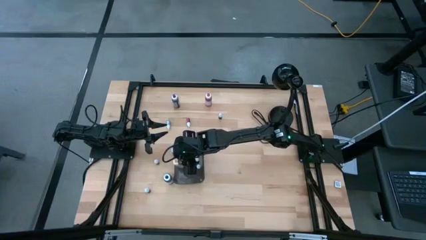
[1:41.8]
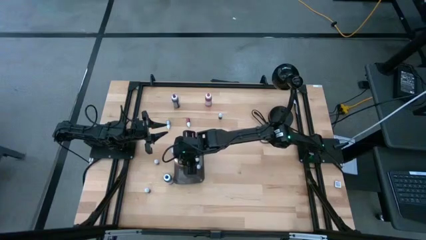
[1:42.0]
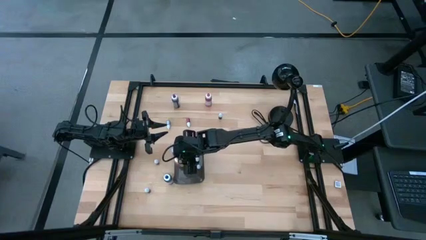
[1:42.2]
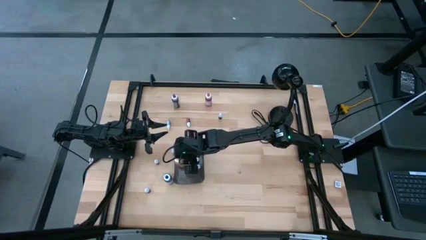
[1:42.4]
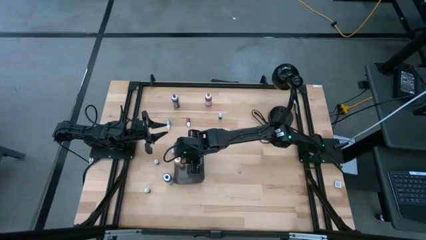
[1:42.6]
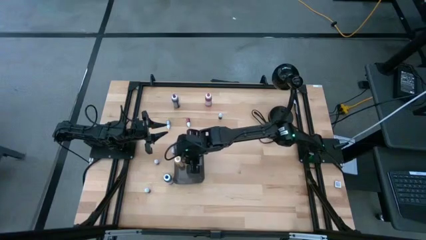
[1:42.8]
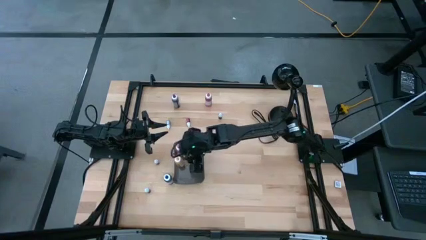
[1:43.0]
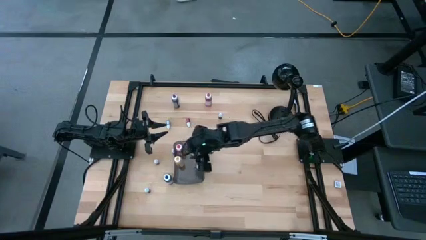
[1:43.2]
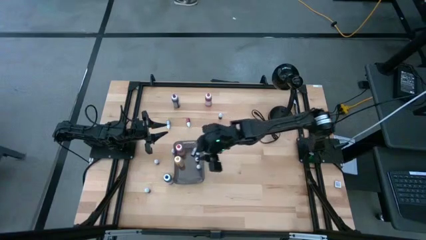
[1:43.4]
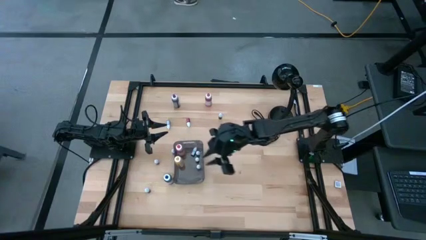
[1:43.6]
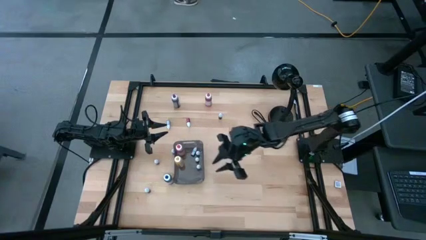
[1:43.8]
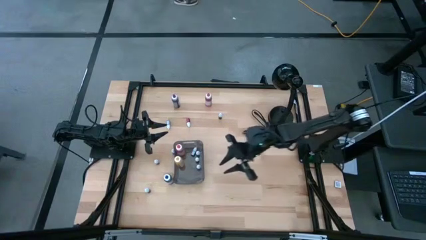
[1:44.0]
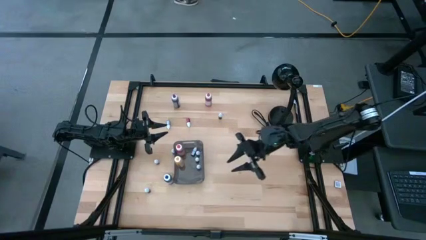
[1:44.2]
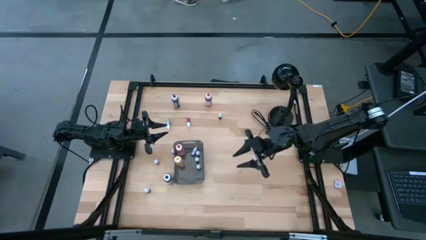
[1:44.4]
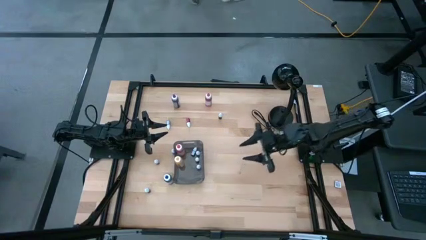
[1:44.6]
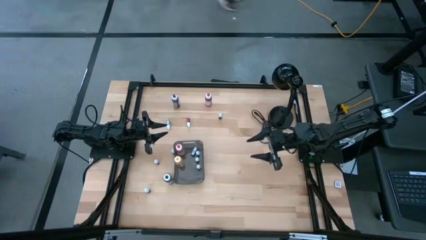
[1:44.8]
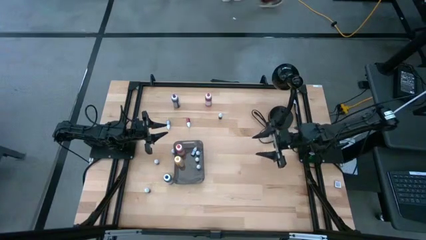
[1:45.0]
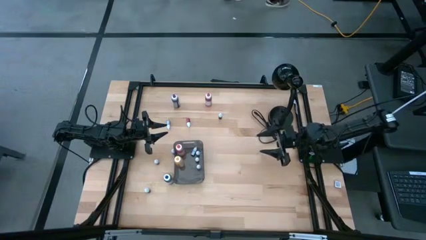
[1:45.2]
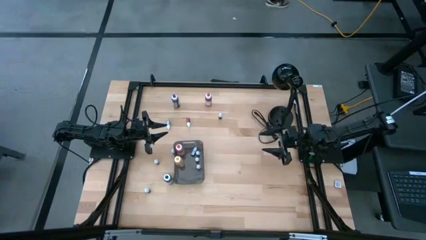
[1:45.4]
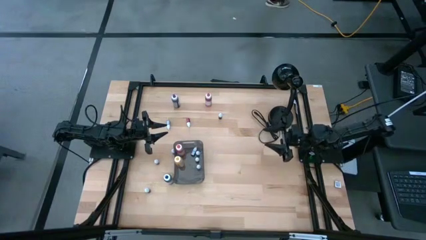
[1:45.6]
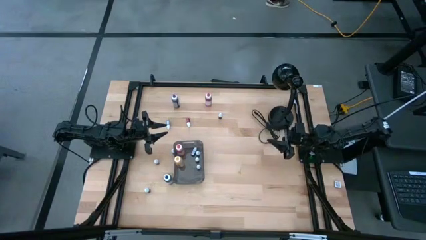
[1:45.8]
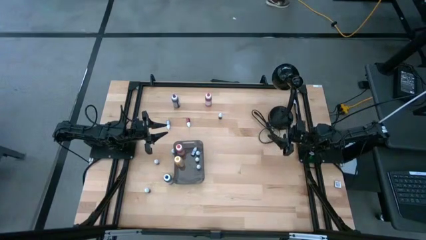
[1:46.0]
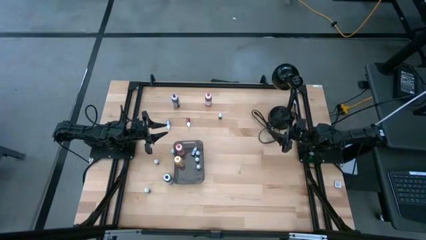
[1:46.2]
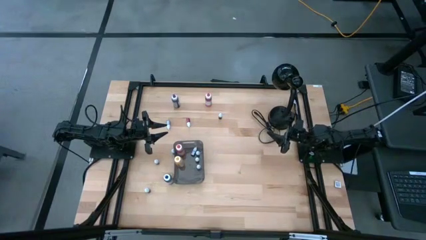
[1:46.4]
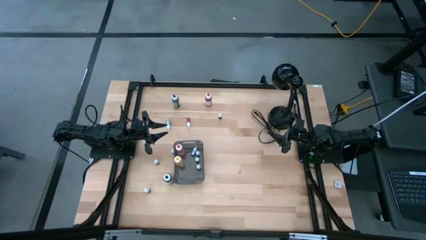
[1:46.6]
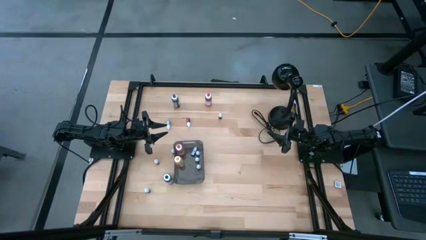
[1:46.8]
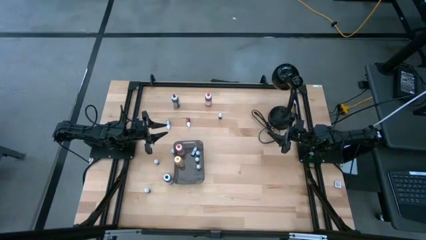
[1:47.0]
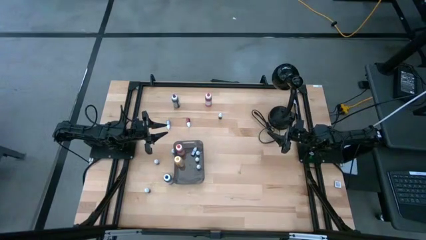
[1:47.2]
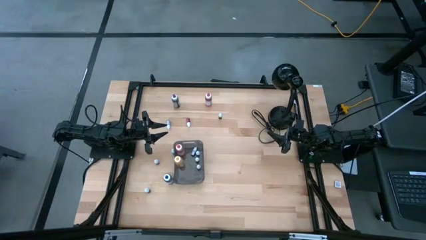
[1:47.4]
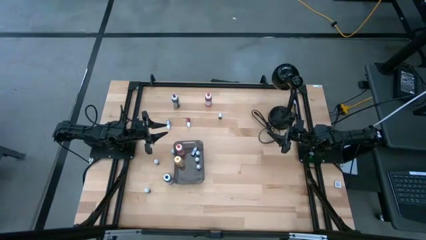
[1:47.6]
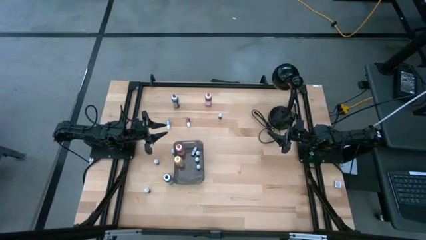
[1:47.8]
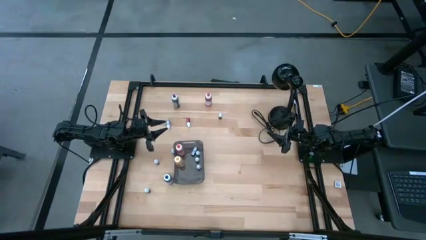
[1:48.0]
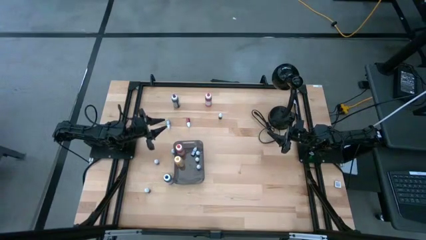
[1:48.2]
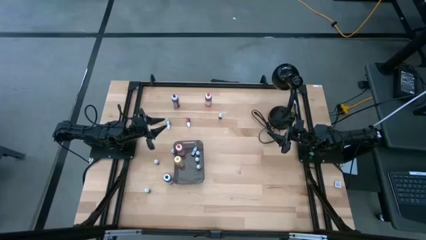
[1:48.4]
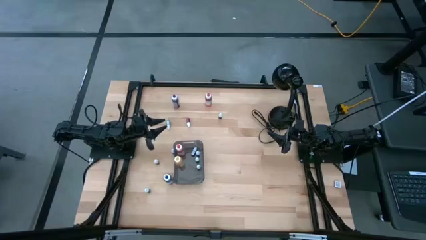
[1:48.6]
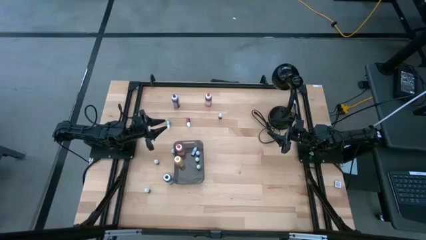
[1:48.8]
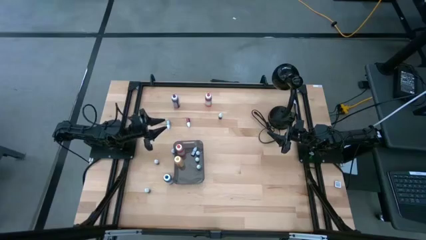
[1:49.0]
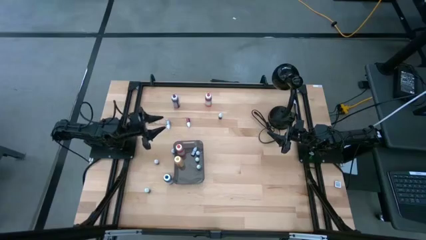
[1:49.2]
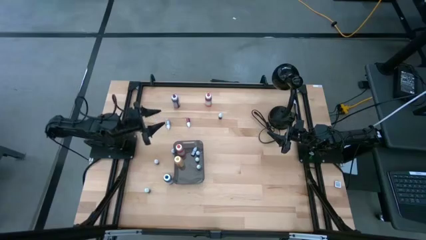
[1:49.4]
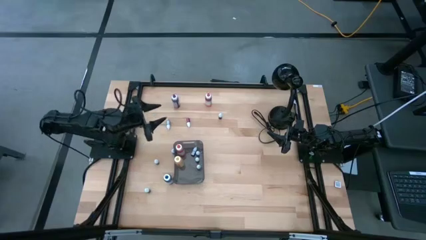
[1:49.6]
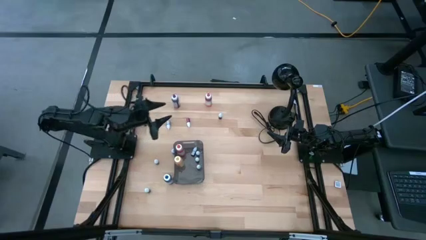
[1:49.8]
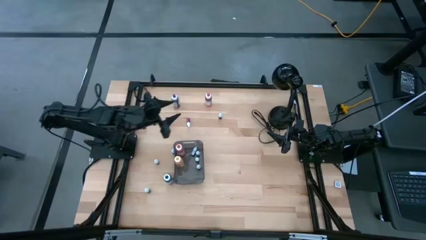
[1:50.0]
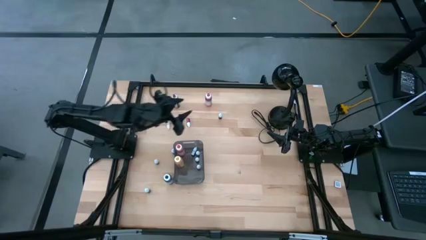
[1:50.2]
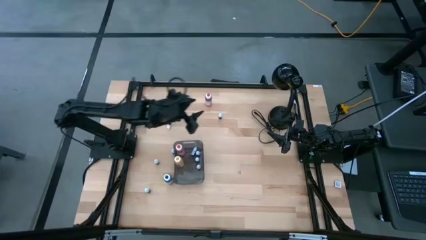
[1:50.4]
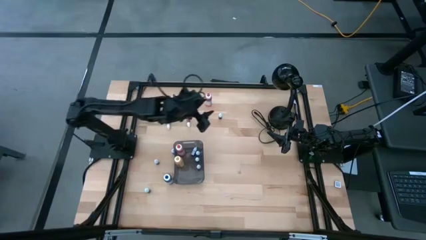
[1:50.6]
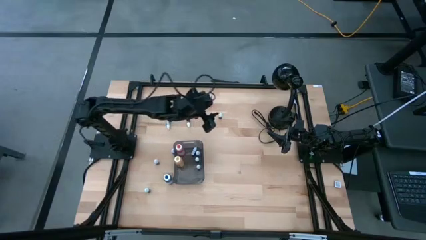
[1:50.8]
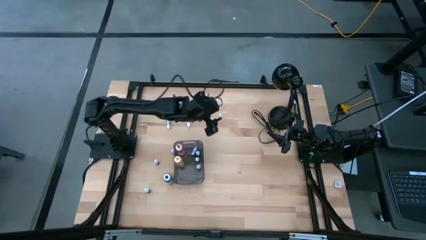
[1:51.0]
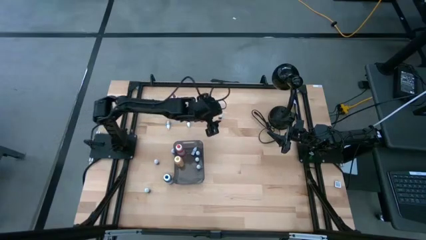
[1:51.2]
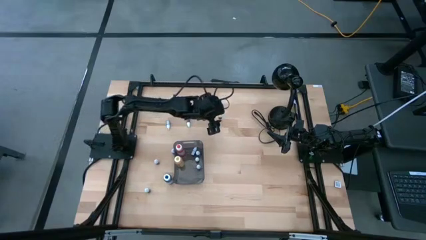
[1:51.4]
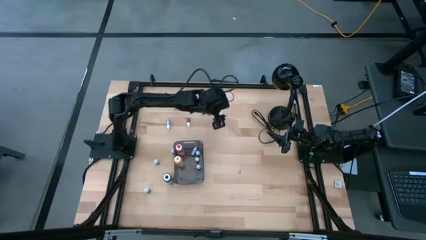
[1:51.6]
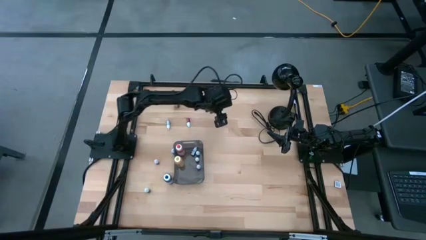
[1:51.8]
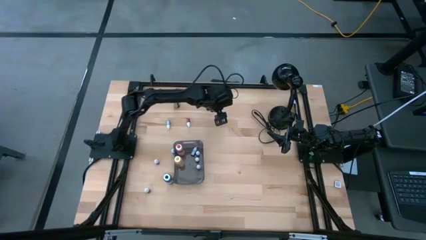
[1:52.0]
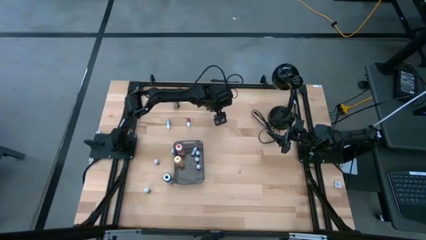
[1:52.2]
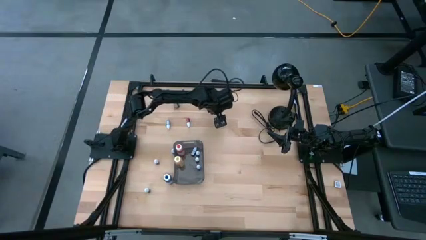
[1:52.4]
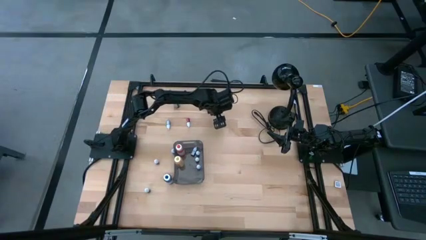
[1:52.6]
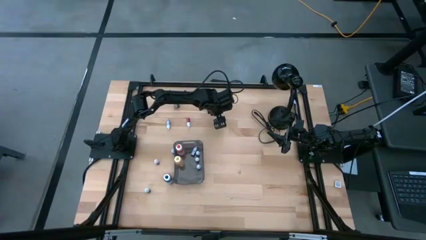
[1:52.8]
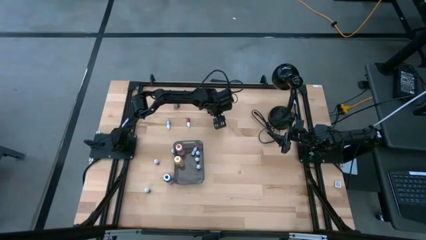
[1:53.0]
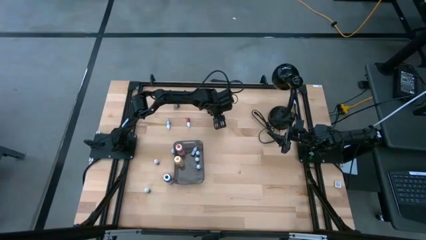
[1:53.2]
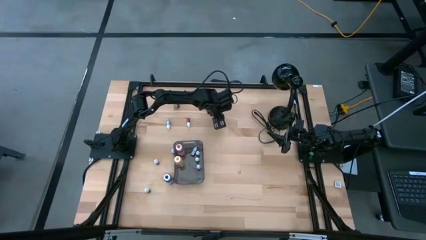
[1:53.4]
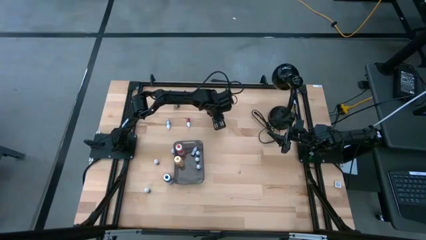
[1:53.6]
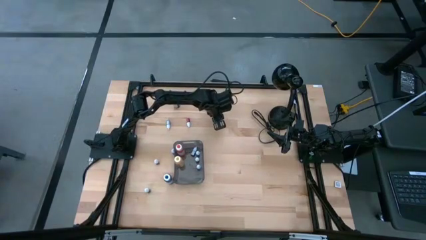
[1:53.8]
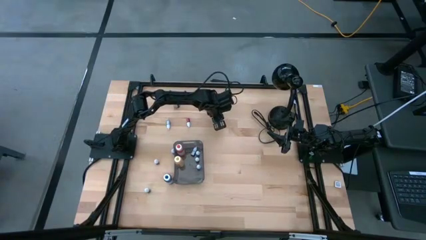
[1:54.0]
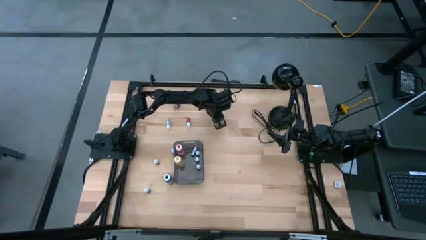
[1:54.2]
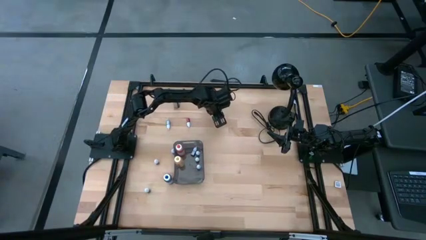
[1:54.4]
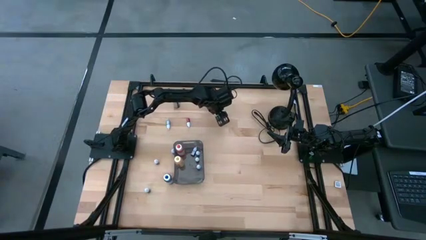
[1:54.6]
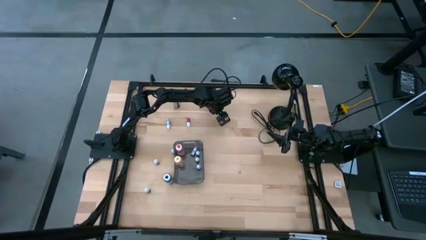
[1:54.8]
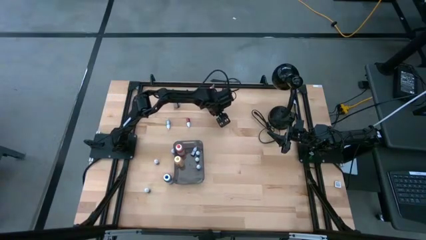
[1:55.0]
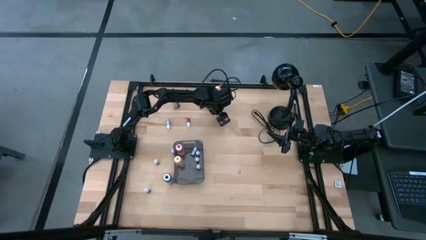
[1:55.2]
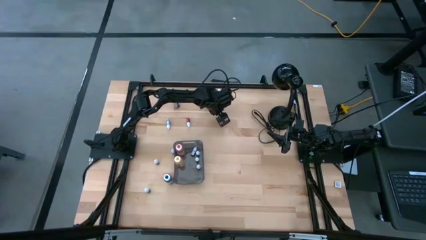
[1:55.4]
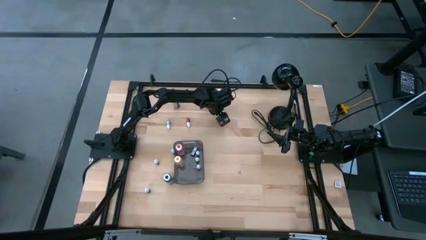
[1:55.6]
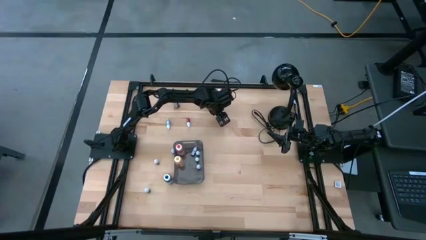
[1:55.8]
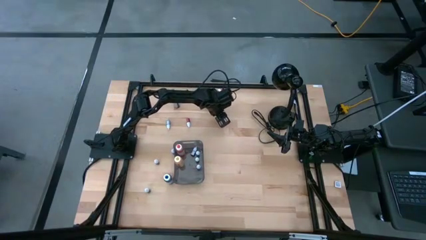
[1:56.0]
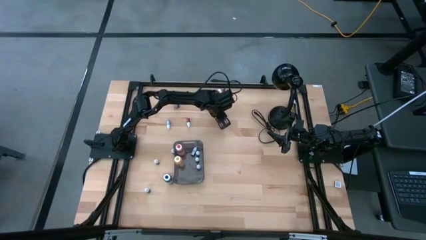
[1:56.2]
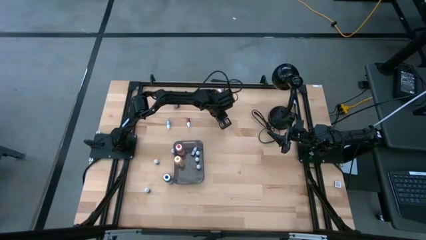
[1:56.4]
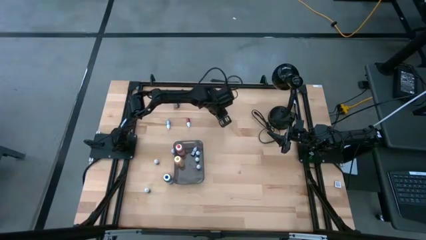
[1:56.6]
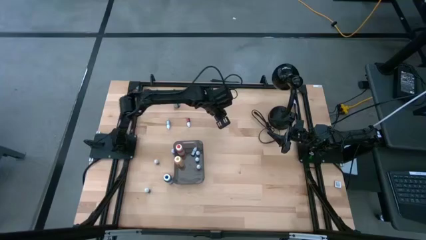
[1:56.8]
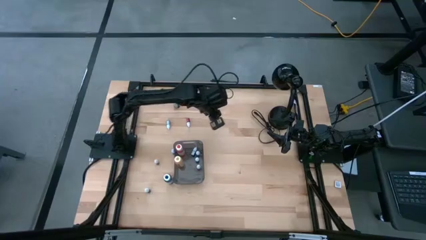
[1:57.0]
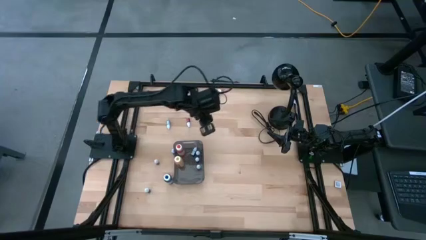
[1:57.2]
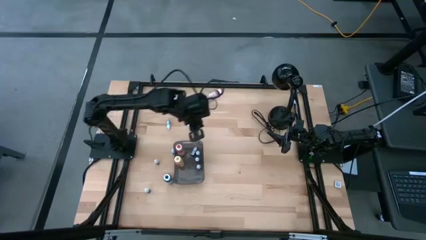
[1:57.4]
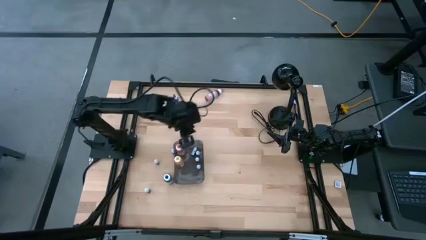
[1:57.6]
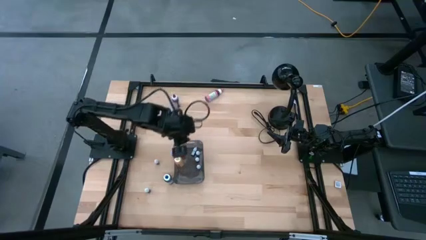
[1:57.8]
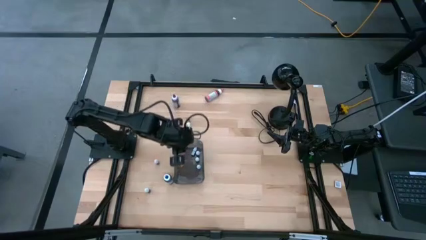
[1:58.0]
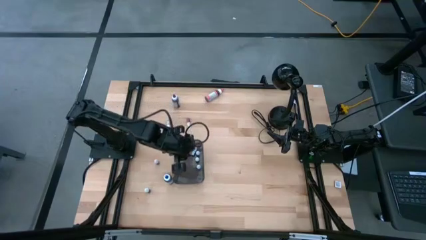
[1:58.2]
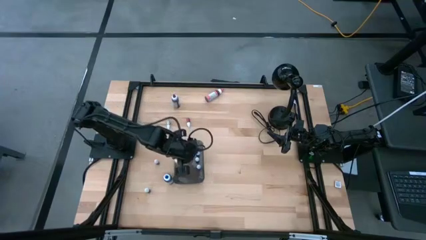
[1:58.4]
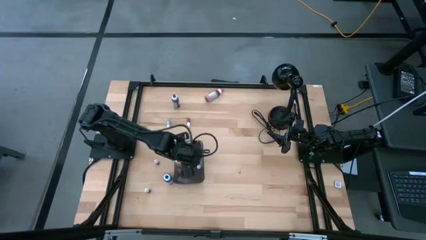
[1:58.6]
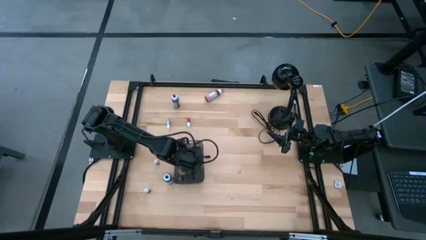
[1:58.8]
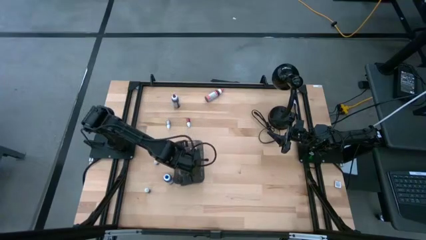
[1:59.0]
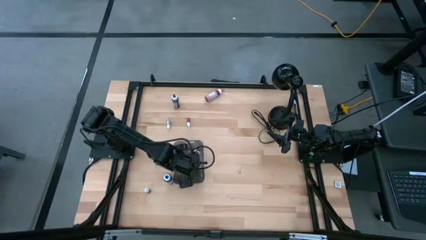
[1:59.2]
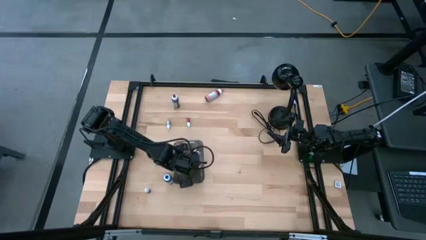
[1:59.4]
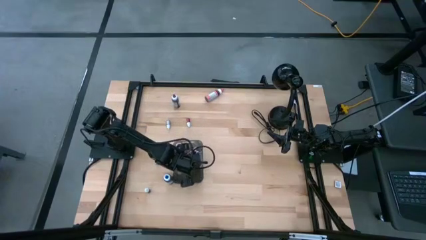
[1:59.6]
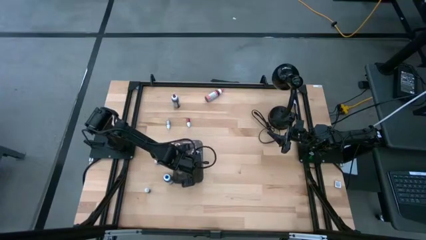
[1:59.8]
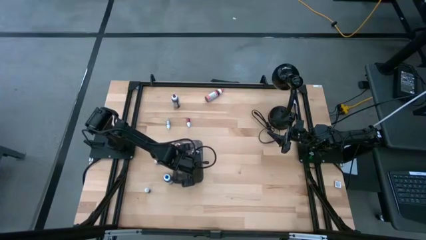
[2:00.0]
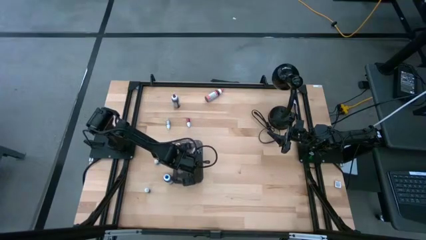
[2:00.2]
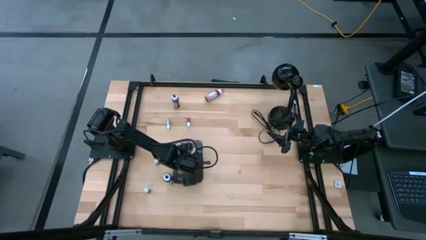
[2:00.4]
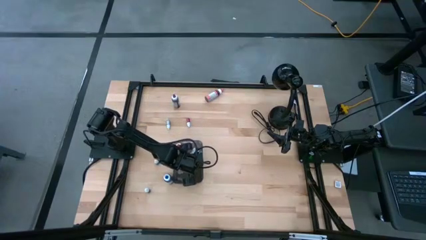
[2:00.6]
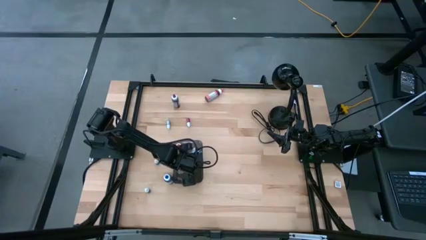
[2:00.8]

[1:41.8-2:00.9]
Task: Pick & Place food coloring
Put the top right purple food coloring bottle into the bin
